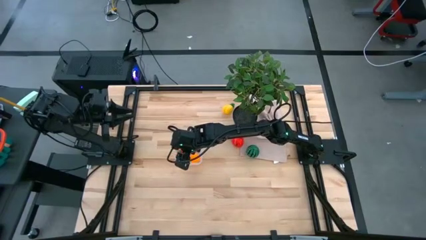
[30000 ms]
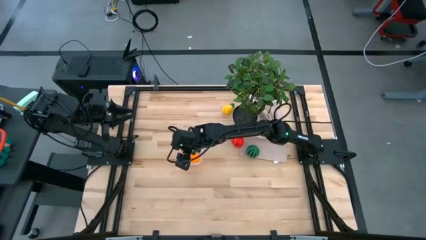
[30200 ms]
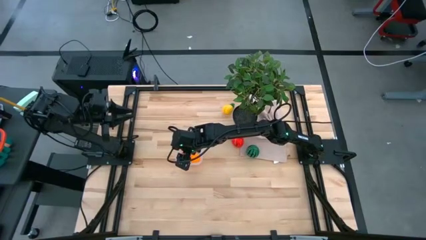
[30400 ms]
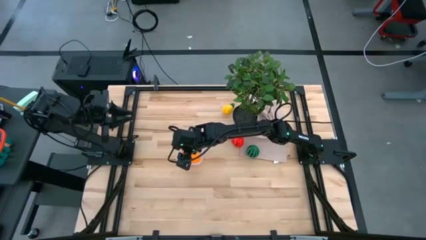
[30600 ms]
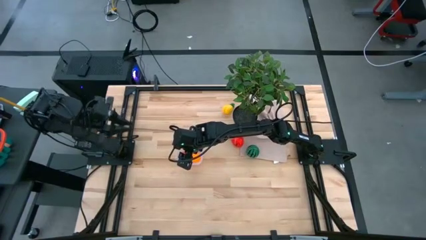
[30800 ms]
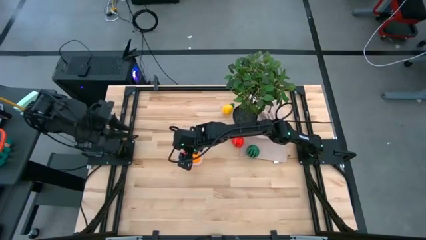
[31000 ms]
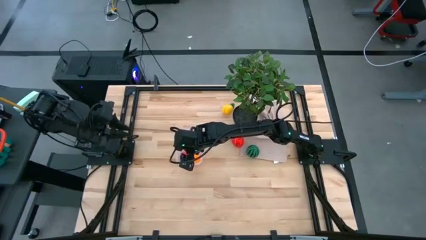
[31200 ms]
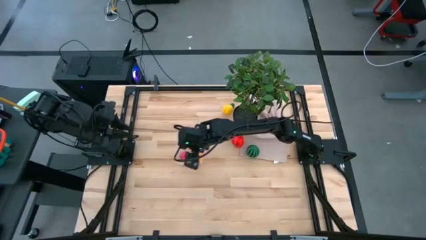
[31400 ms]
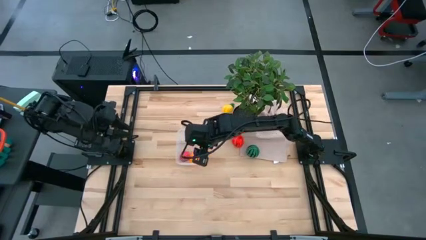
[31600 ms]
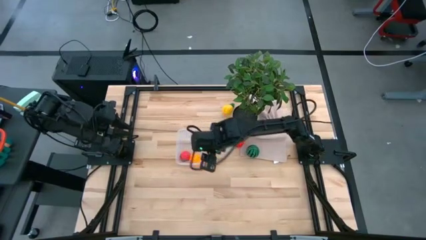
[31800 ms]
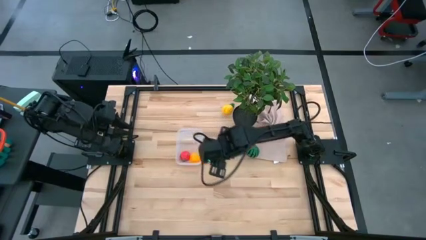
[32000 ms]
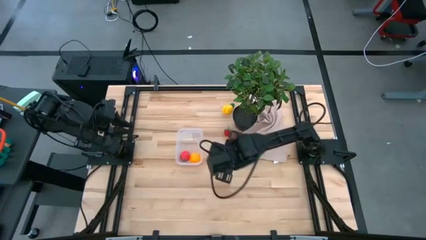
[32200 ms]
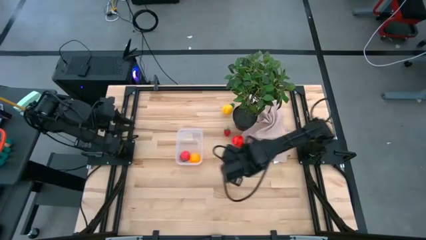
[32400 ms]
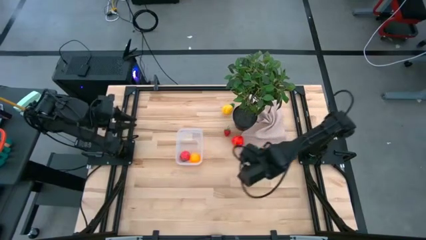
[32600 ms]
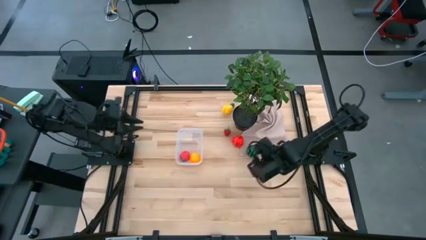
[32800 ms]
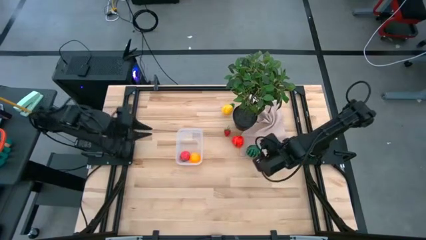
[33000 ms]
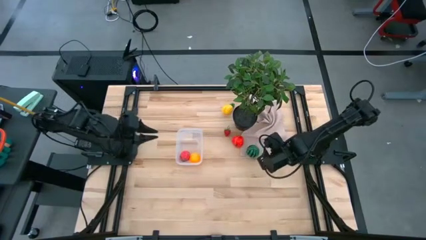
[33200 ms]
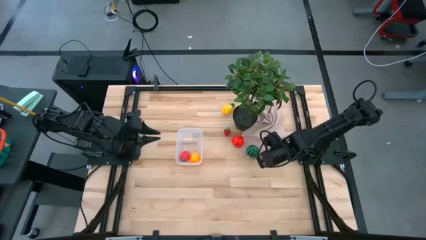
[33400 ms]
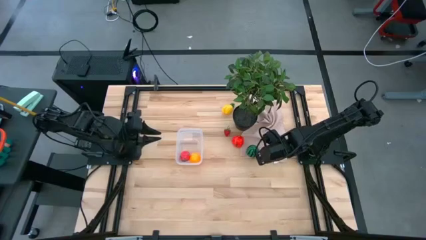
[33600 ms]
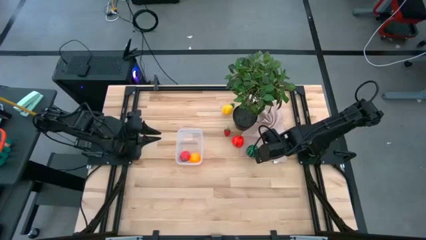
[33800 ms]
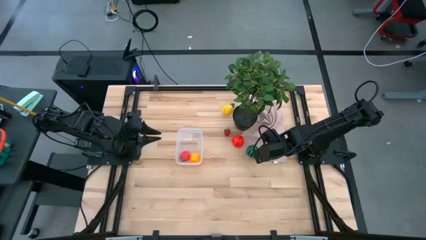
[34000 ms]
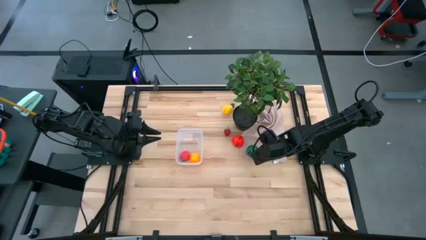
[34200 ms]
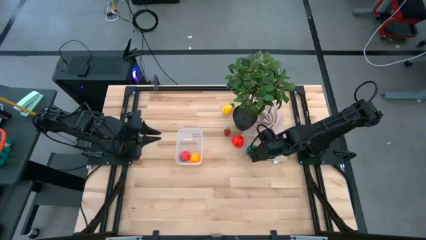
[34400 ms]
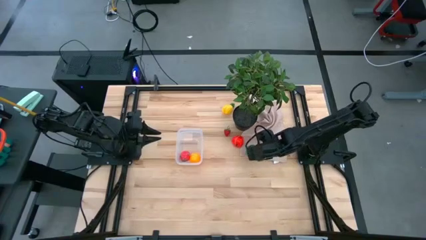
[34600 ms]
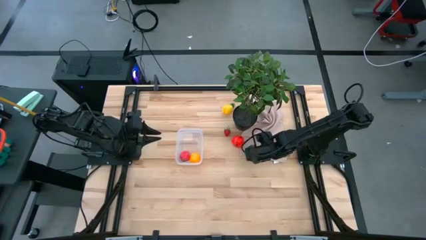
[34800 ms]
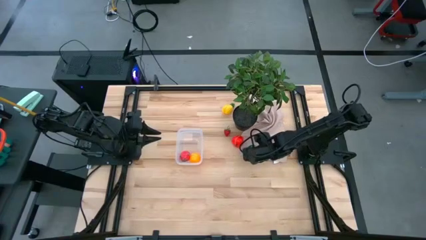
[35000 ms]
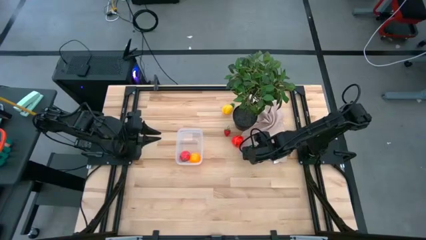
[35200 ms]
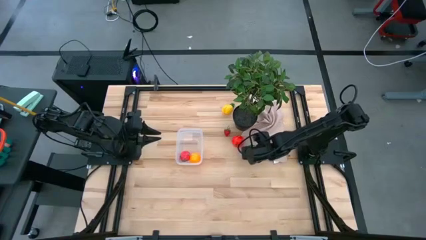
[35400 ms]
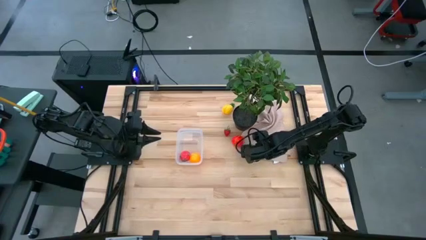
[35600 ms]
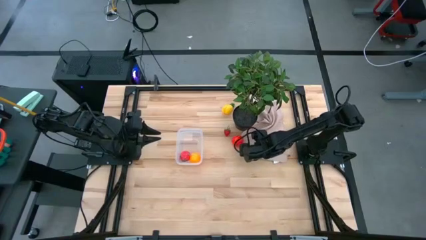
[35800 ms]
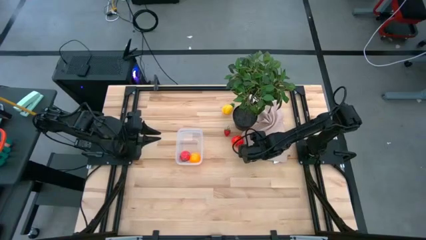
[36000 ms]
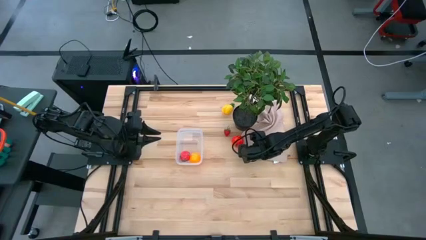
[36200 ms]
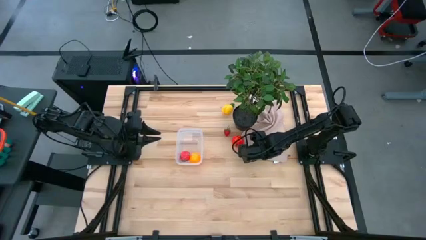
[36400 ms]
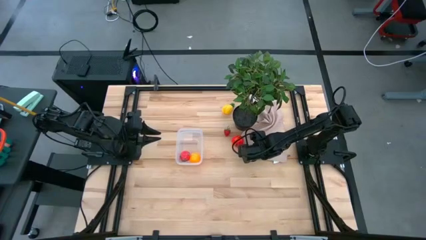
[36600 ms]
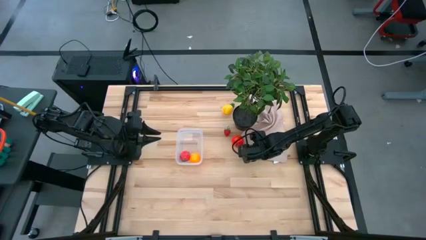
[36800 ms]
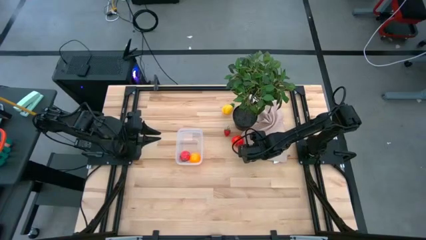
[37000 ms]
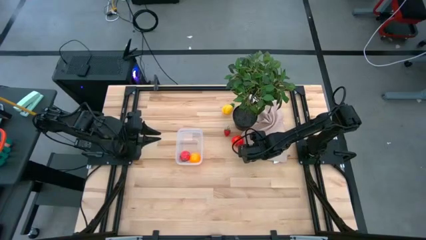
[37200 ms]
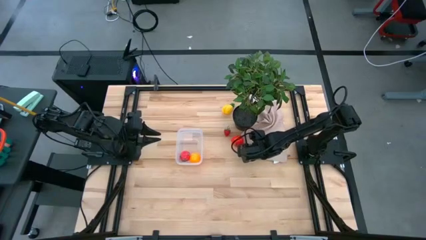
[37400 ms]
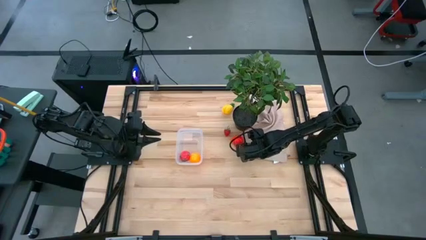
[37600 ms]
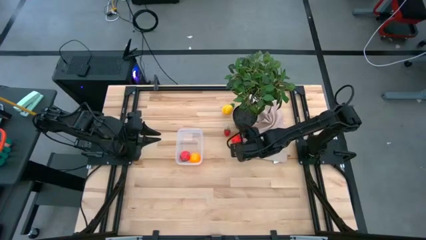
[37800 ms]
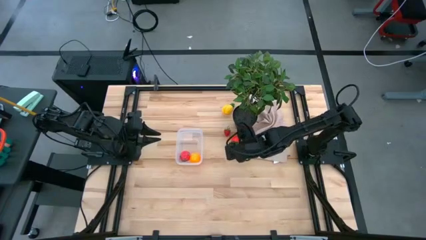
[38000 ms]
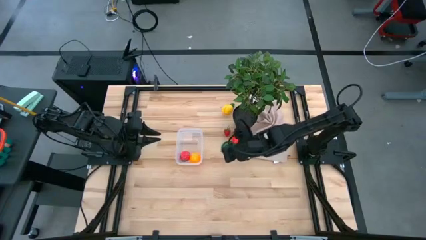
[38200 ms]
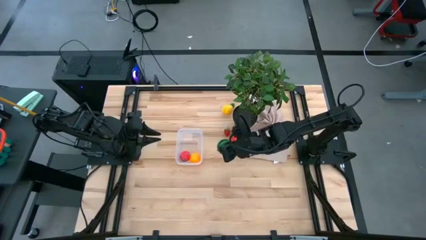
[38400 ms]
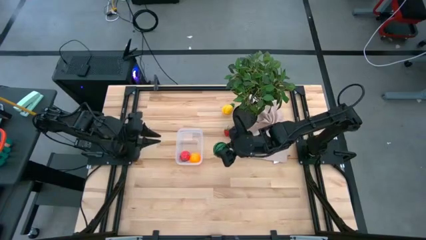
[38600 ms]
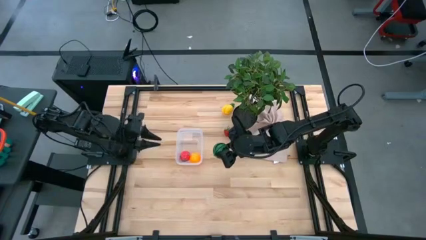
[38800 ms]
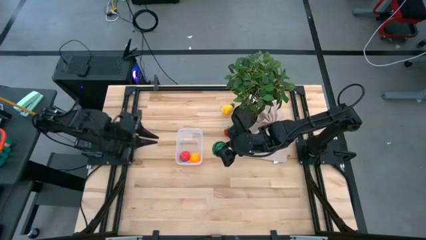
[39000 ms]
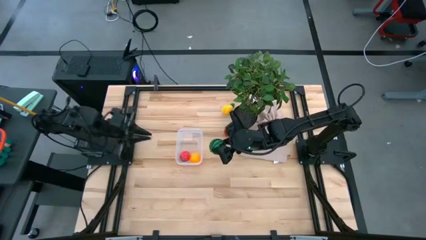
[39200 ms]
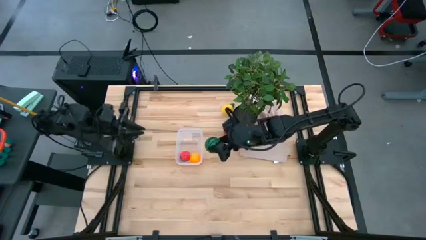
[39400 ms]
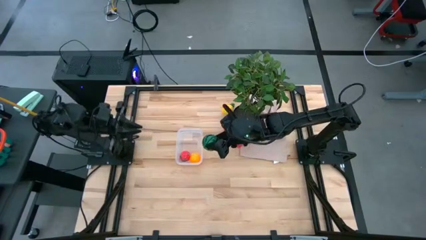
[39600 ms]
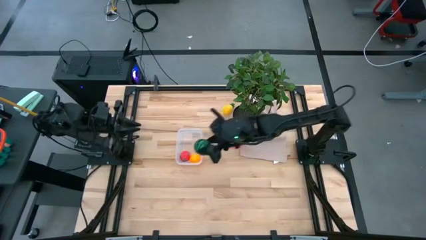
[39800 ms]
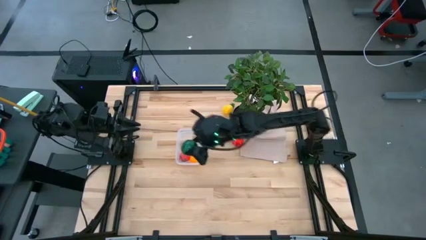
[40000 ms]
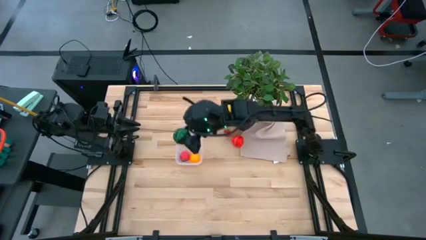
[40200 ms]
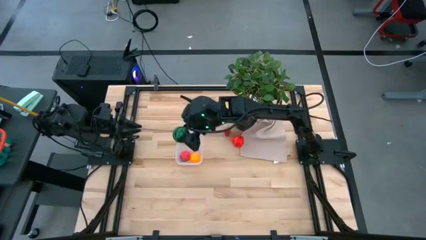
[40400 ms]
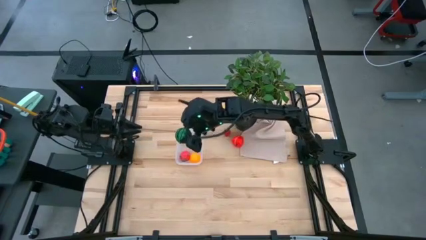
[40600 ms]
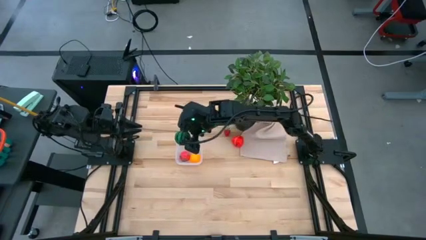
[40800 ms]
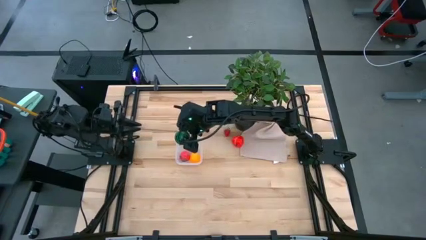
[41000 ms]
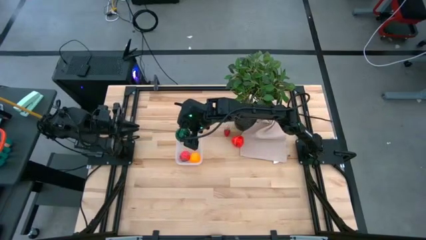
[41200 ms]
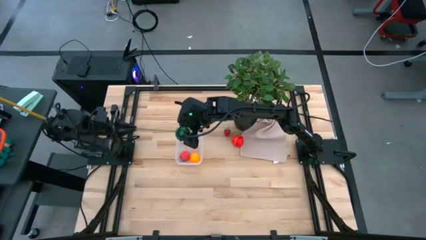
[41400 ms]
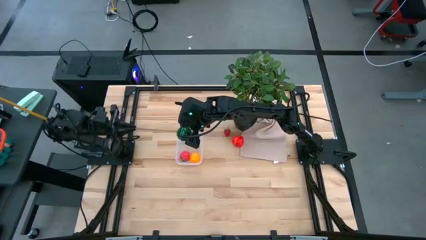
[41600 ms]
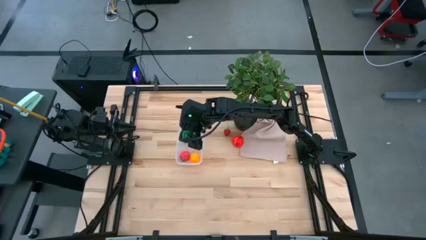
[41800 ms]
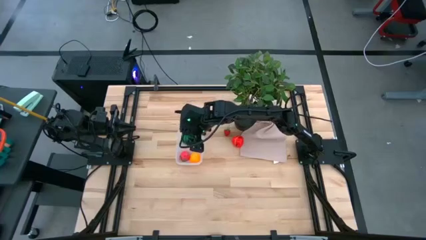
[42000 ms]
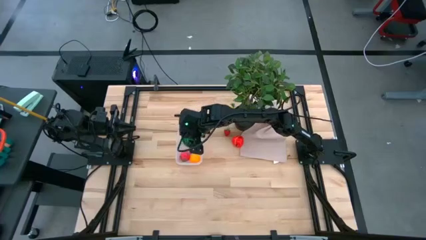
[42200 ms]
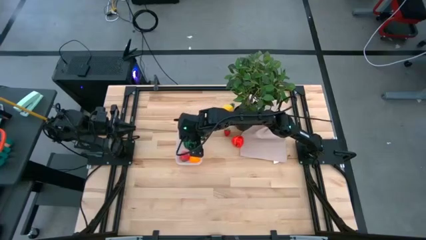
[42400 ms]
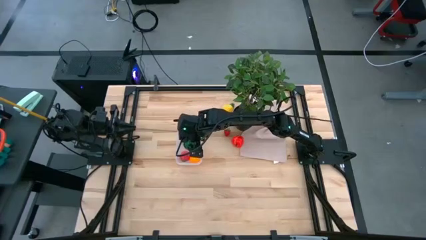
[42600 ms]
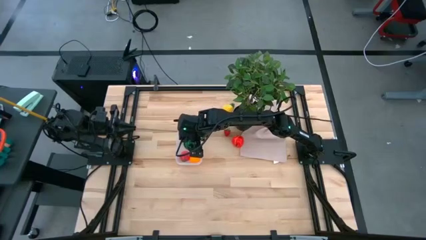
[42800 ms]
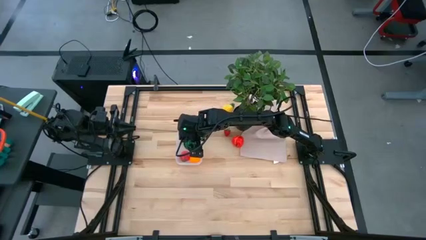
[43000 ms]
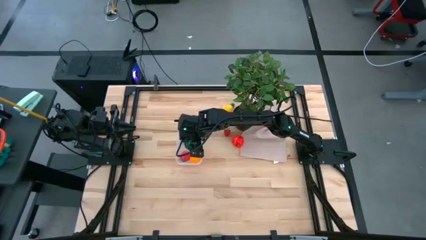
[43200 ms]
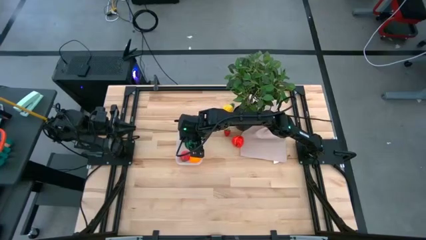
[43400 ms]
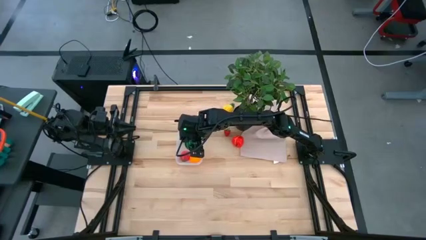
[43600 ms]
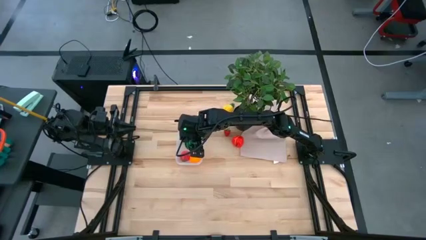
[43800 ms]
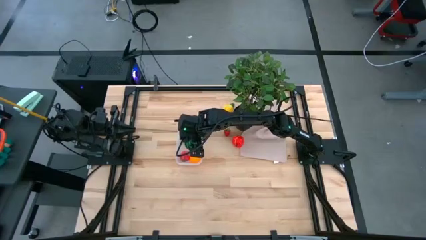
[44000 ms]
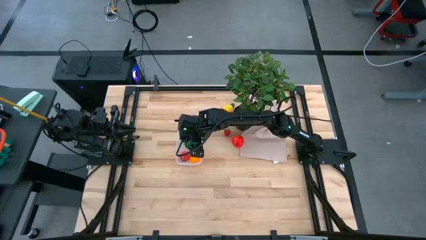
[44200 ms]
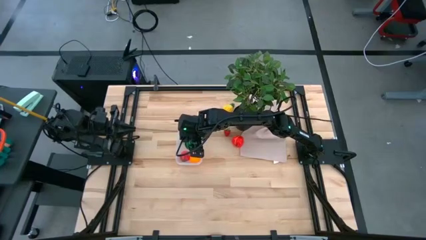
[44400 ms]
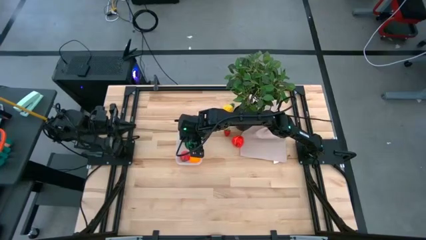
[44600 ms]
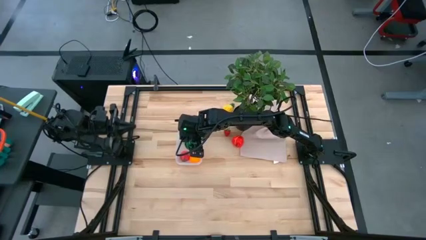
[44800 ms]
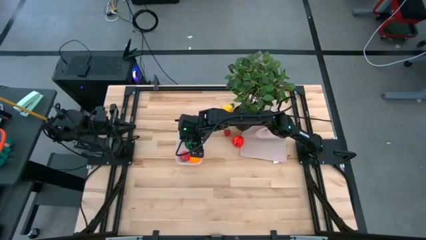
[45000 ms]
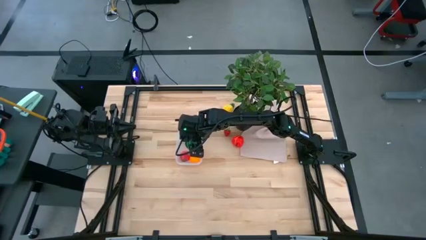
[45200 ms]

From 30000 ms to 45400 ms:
Task: Pick and placing Produce into tupperware
Put the green watermelon into the transparent bin

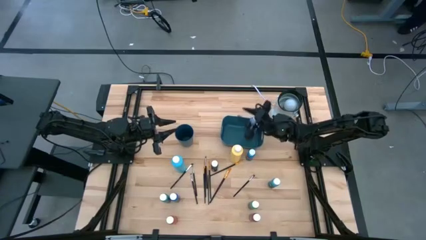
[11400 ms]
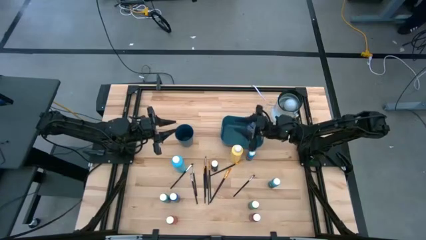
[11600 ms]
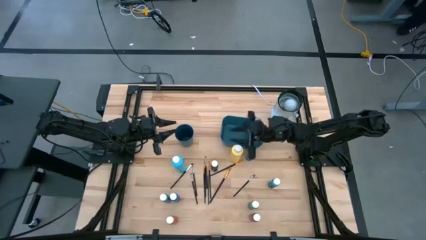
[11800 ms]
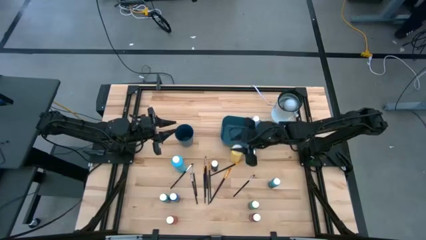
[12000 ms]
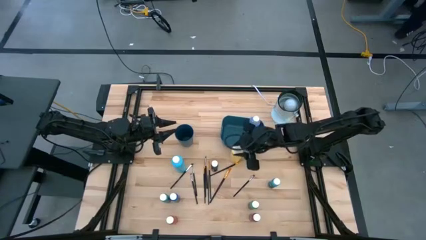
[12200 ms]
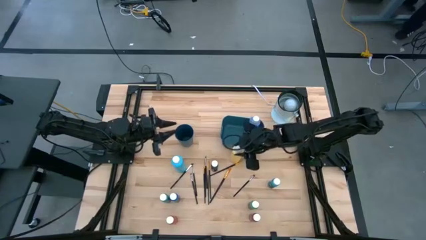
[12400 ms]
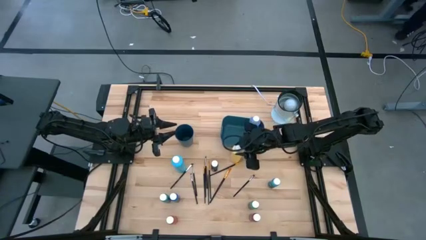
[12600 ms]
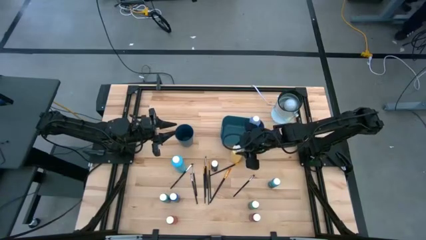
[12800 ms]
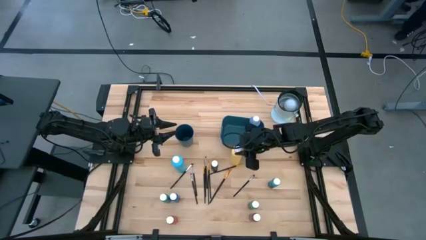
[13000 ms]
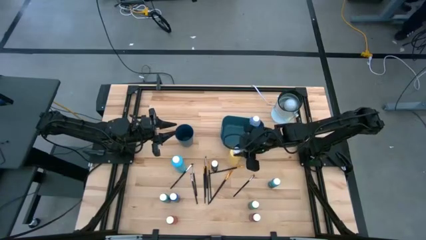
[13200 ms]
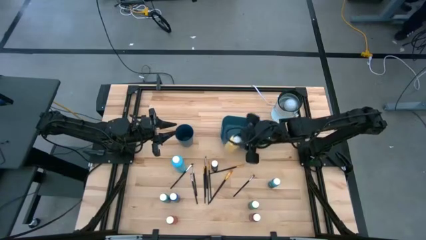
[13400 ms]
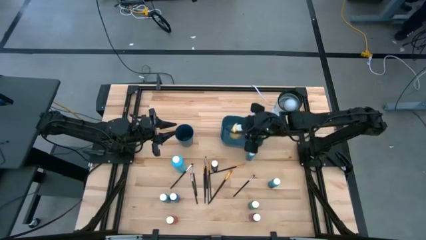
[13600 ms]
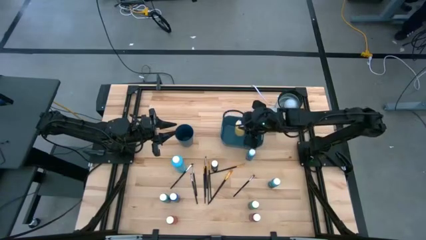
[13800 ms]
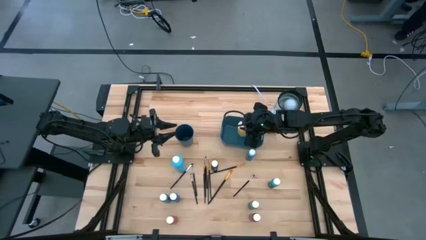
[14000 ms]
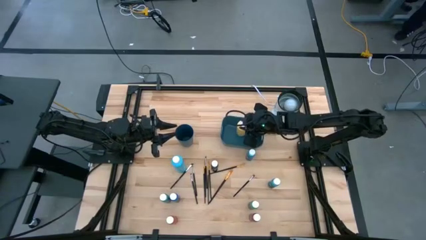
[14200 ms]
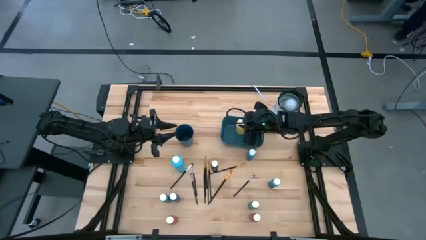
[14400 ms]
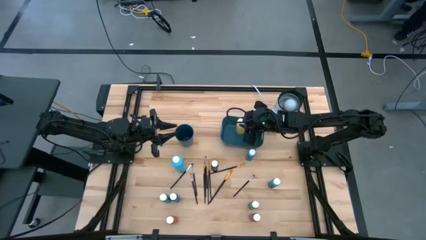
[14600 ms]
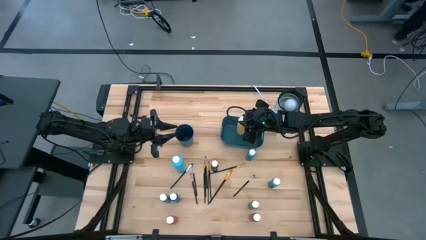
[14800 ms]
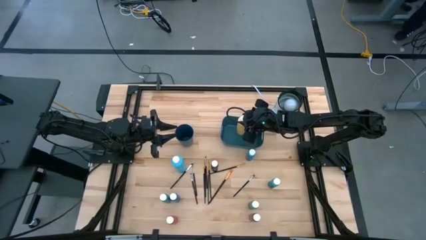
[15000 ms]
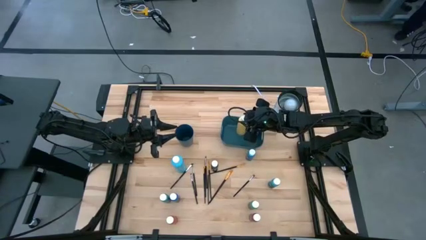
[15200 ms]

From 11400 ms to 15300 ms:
Task: Pick & Place Paint Supplies
Put the large yellow paint bottle into the blue bin
